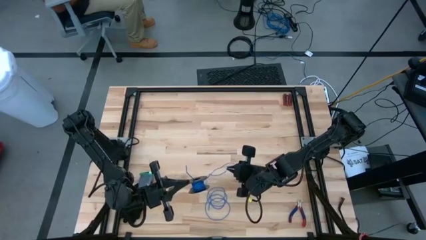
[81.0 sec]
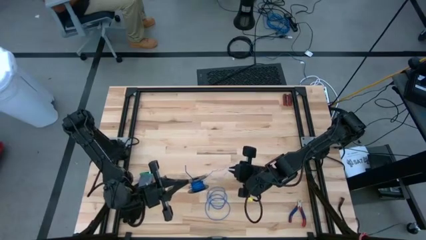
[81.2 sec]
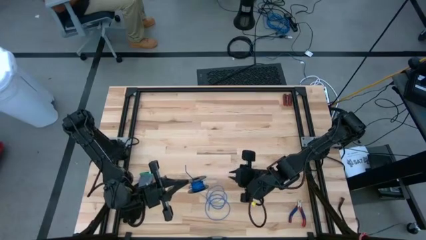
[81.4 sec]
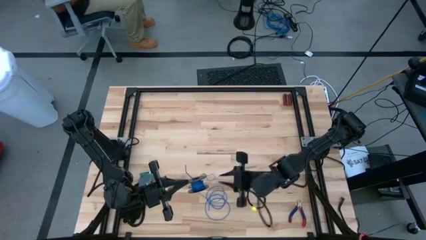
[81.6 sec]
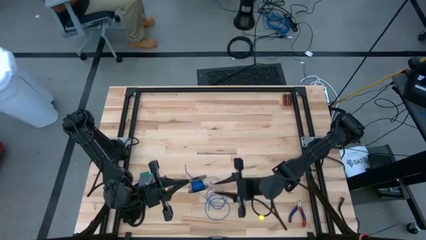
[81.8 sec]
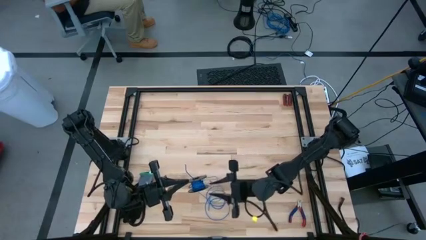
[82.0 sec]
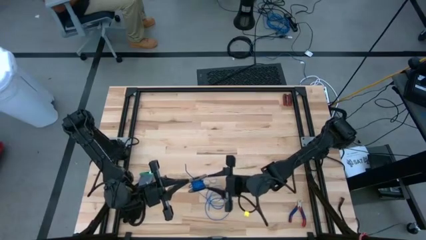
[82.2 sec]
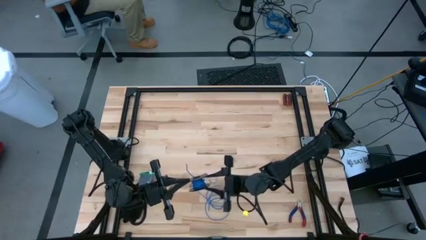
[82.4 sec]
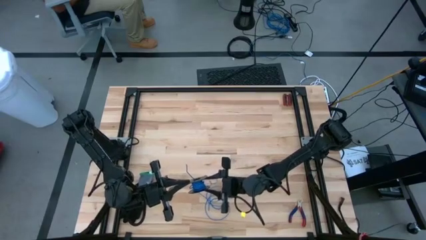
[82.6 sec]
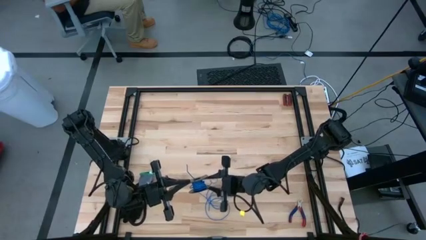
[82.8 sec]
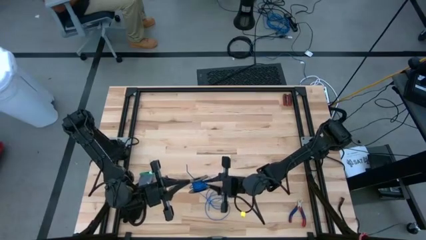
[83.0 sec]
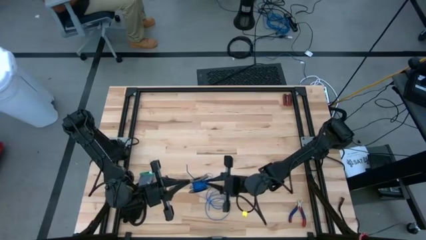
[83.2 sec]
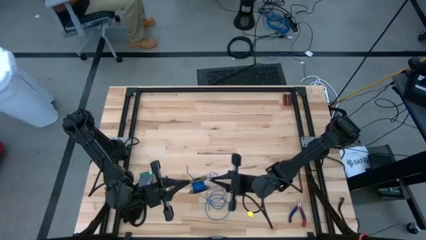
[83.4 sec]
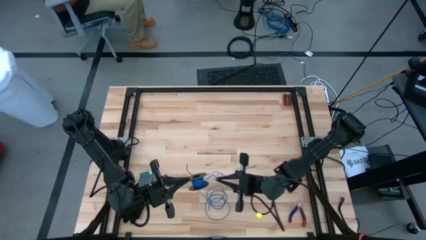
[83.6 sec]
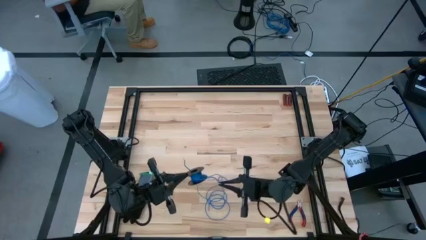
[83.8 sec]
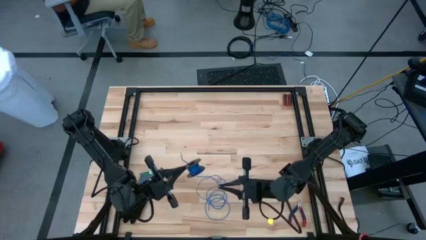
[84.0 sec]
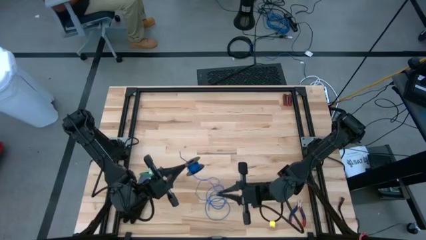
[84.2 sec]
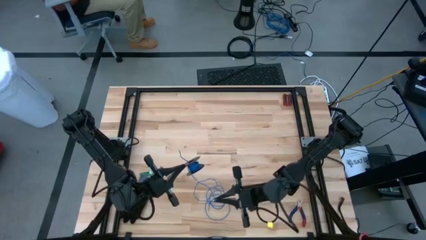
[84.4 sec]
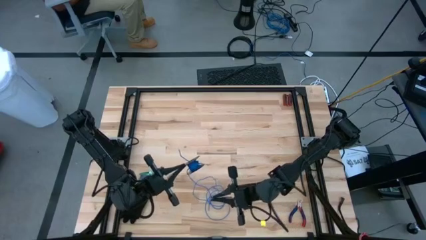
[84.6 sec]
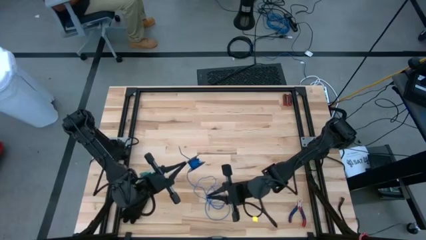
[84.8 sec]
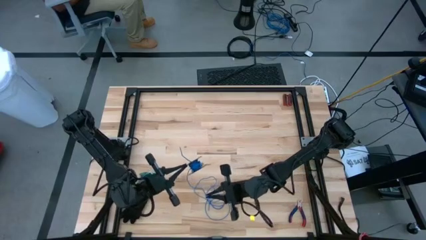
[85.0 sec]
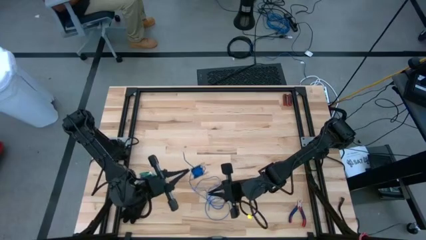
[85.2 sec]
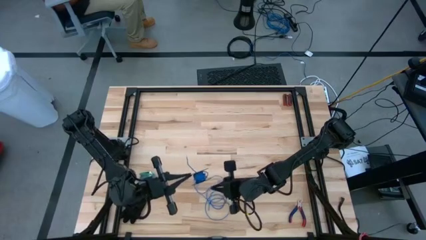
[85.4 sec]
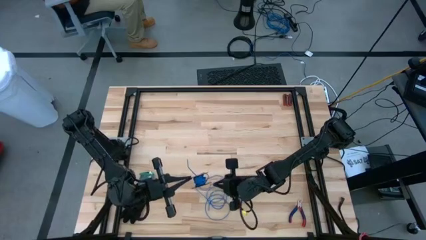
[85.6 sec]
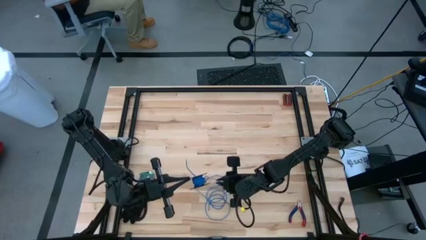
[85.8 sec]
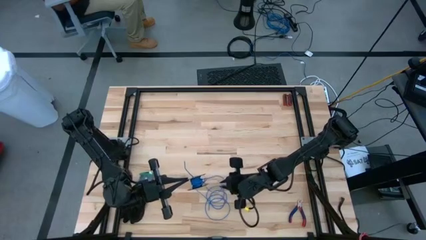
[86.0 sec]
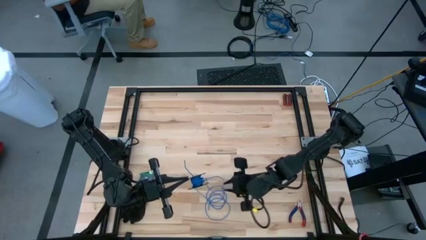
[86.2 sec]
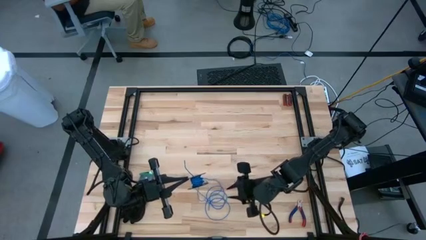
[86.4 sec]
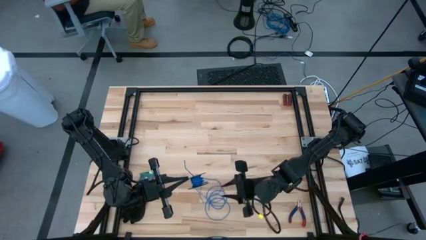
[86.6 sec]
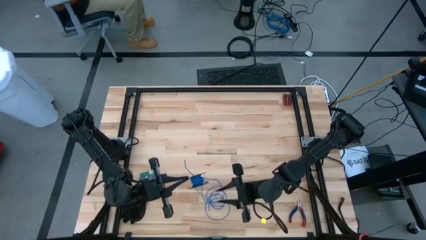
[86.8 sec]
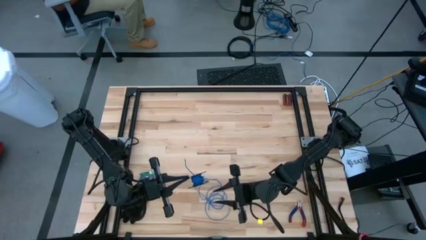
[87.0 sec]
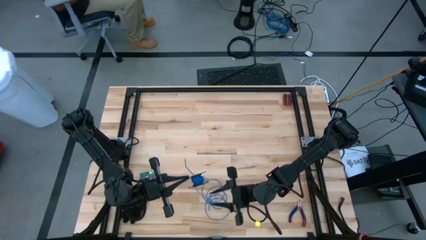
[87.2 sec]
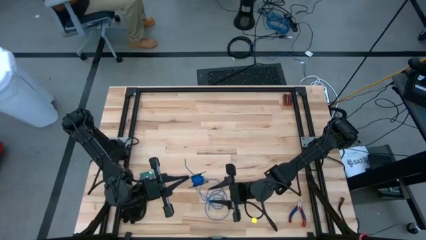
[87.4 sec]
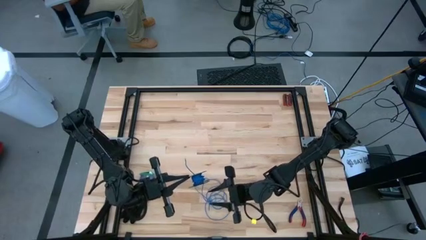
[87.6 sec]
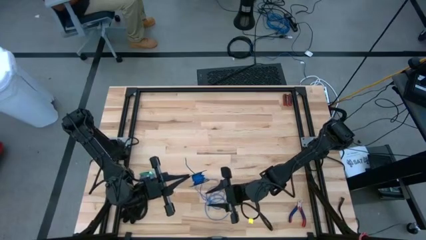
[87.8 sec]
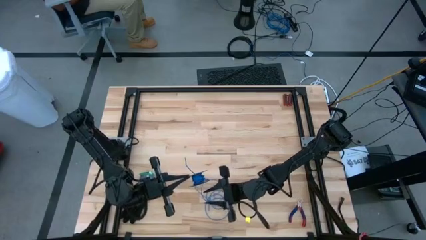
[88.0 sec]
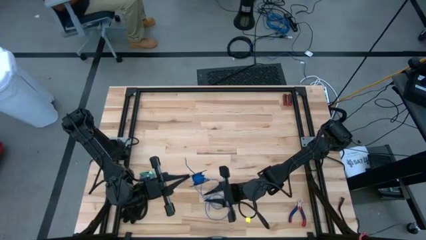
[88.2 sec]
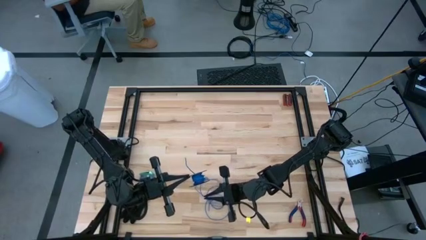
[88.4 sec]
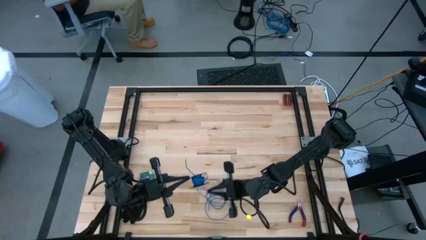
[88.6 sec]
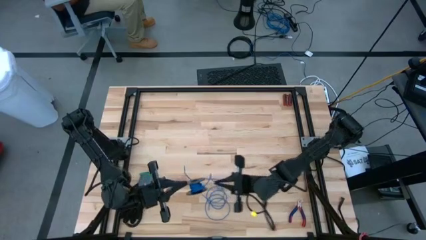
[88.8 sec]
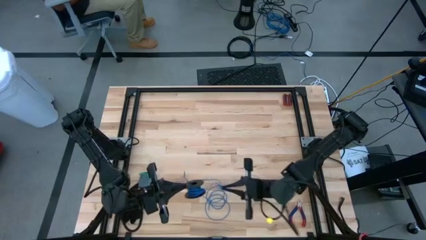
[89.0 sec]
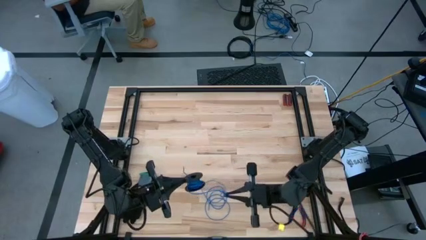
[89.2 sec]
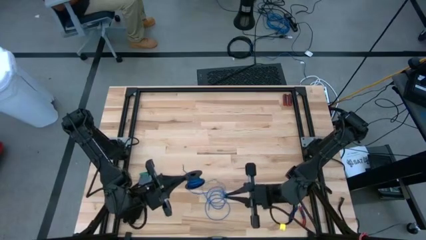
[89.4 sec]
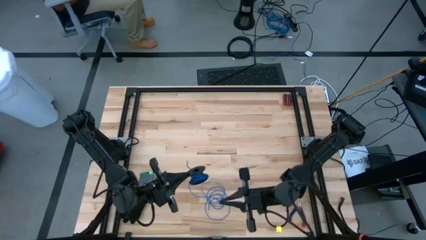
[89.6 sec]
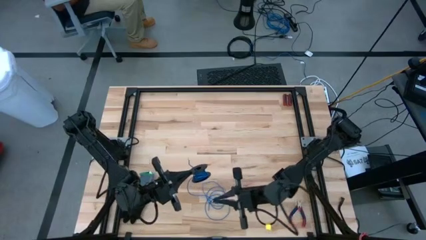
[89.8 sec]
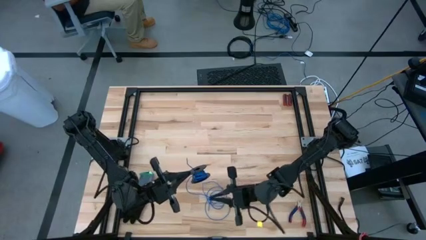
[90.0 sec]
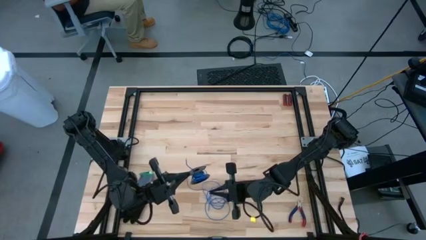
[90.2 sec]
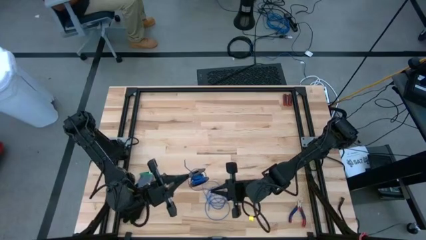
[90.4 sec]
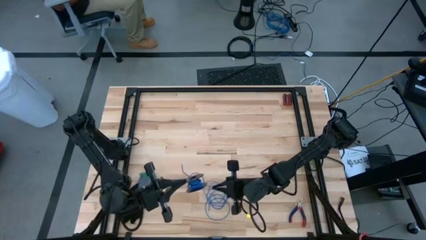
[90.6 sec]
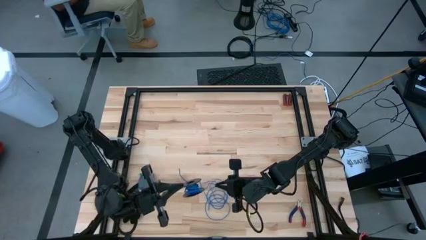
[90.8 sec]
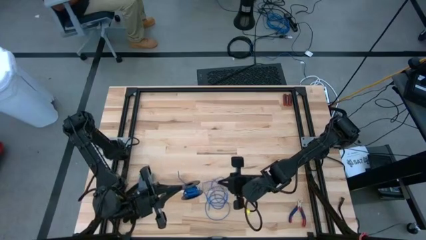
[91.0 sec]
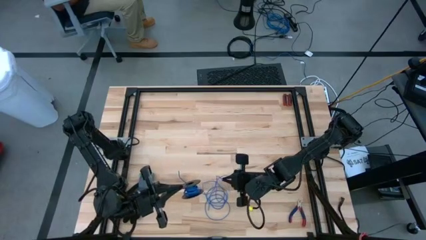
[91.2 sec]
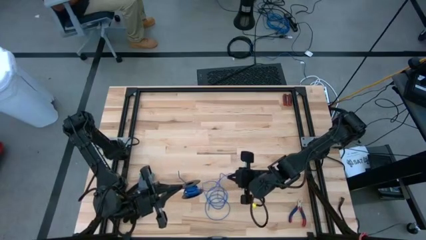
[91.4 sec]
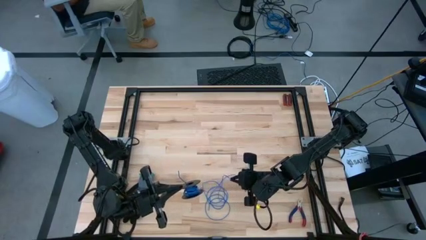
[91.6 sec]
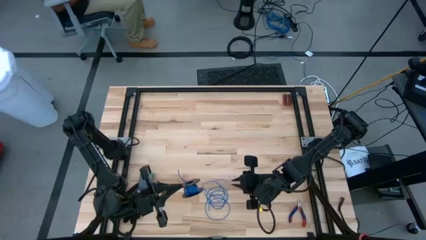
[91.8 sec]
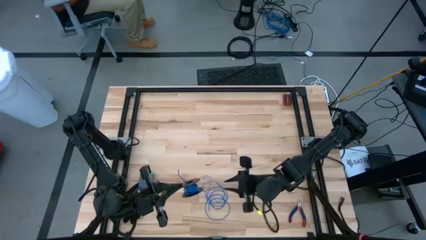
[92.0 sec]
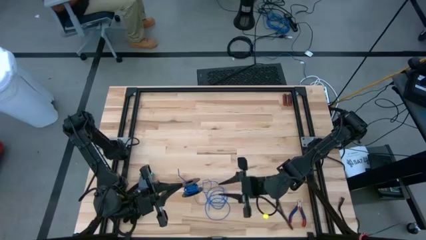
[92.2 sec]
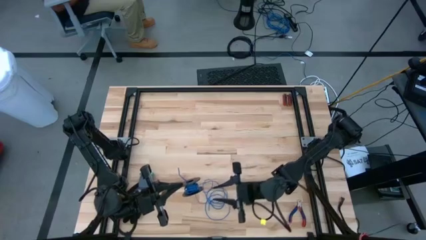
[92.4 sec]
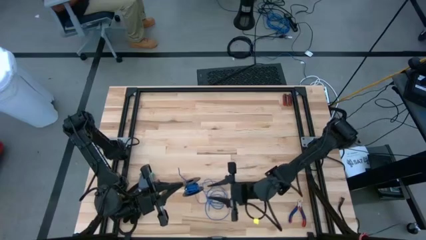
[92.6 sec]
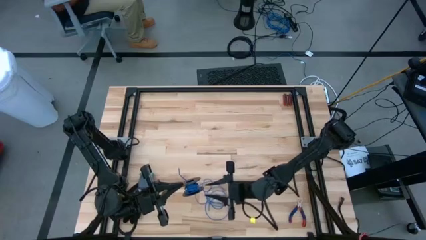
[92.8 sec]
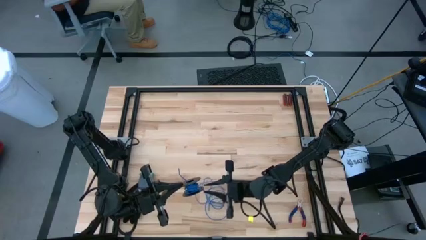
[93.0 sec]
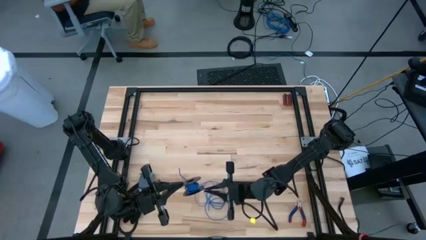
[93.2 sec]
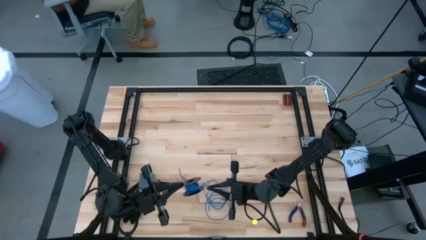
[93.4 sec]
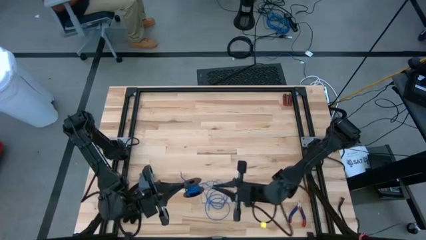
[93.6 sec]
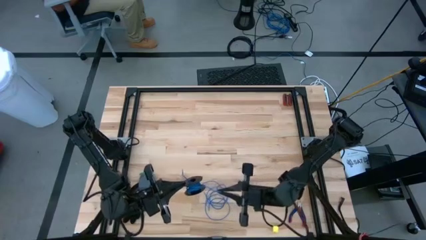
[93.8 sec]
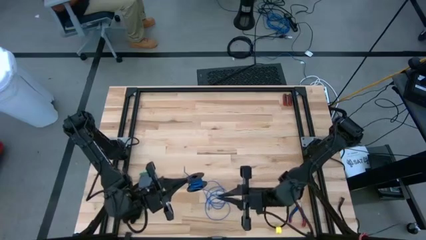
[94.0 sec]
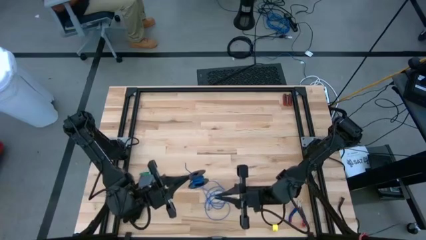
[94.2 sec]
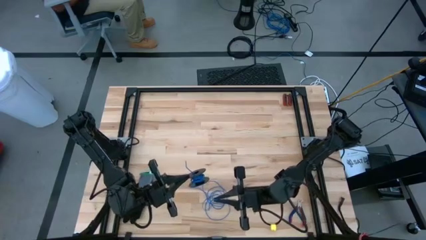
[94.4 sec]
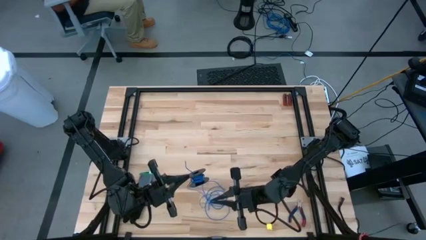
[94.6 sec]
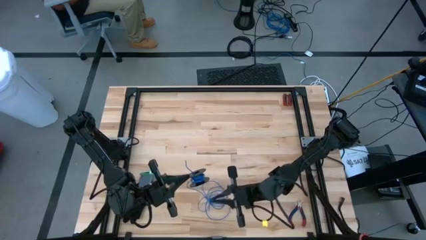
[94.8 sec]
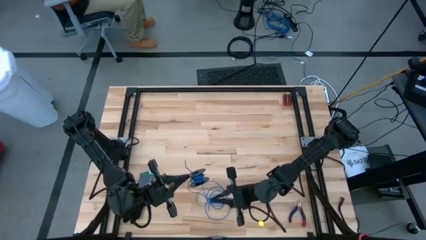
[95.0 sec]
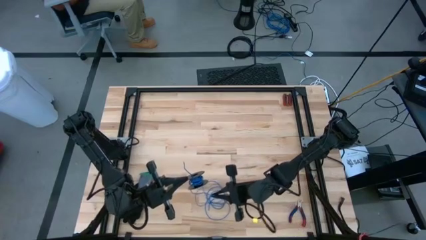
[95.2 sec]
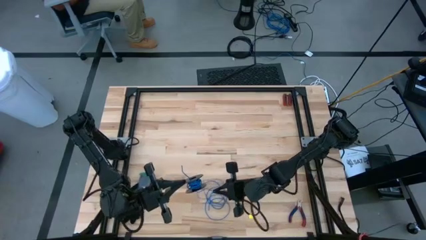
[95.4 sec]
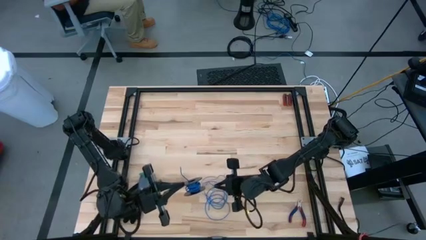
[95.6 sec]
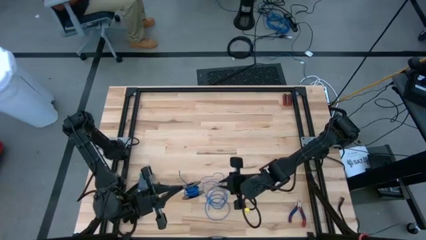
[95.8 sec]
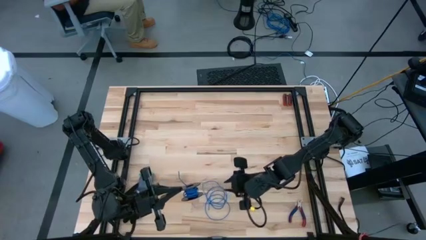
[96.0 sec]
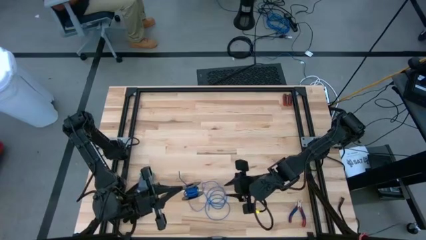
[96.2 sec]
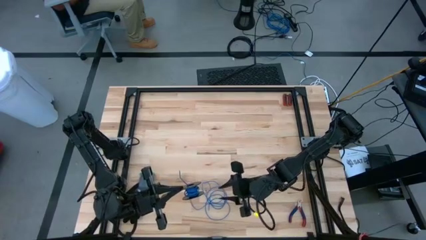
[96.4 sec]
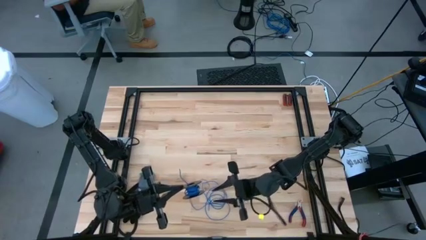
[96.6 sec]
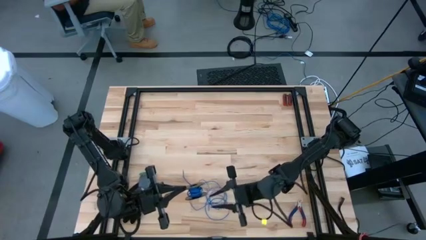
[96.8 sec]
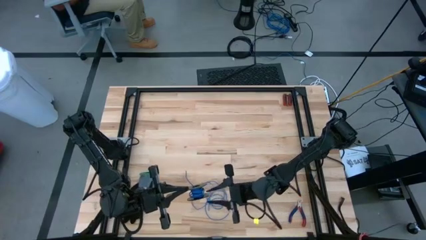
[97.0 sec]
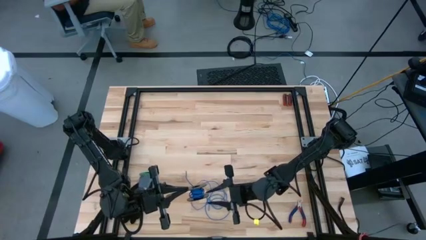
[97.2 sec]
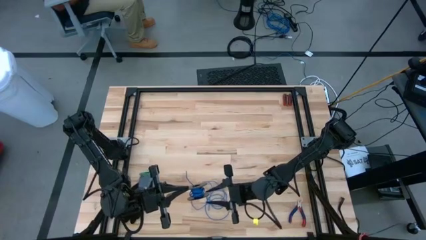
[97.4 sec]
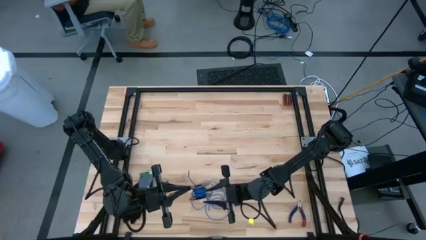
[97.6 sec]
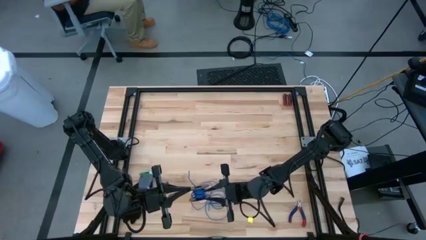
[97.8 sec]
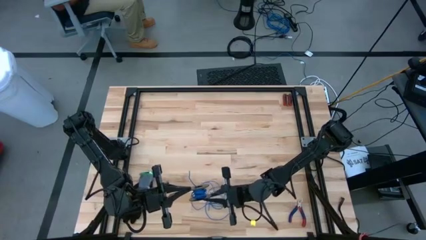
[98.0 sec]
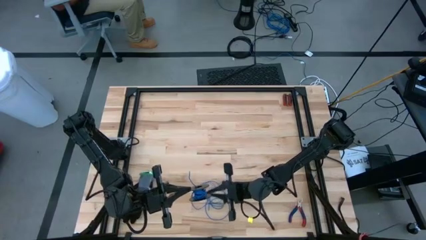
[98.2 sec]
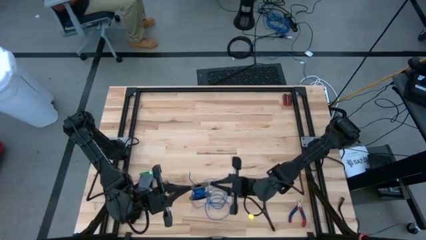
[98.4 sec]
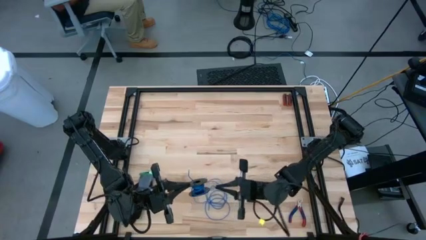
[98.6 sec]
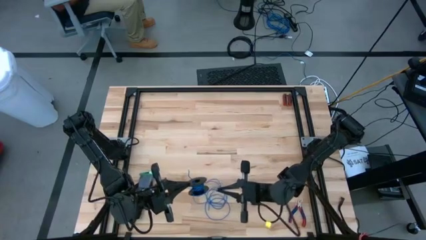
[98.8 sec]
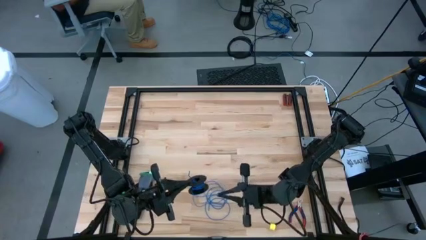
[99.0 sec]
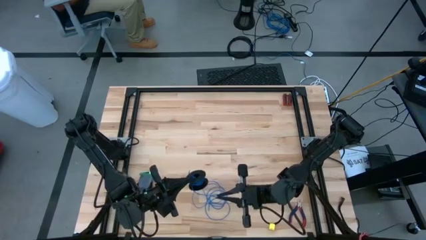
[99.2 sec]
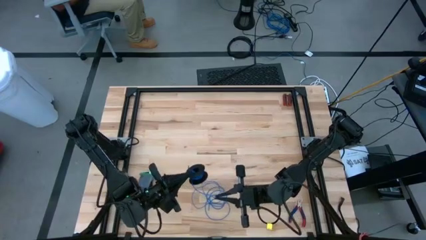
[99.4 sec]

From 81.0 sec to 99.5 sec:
Task: Coil cords
Uncoil the blue wire from the spool
